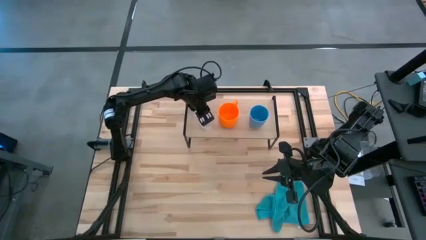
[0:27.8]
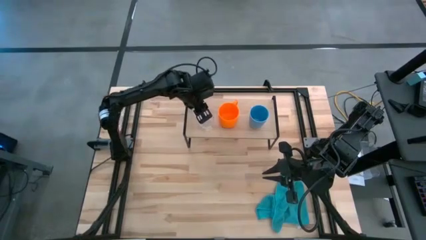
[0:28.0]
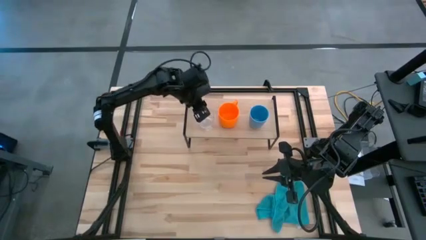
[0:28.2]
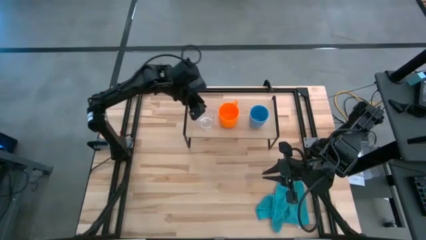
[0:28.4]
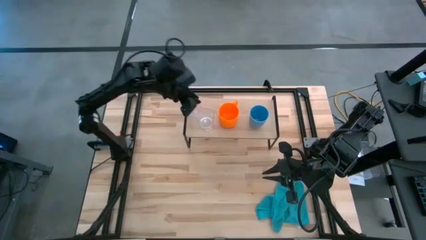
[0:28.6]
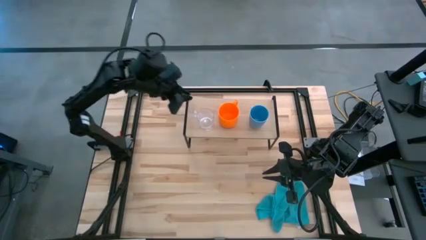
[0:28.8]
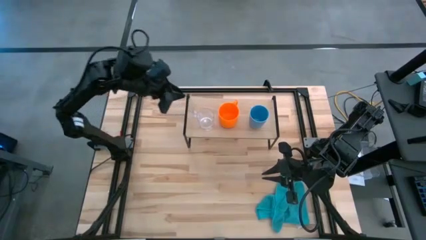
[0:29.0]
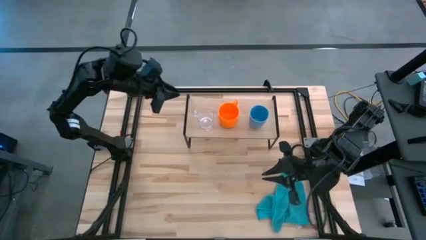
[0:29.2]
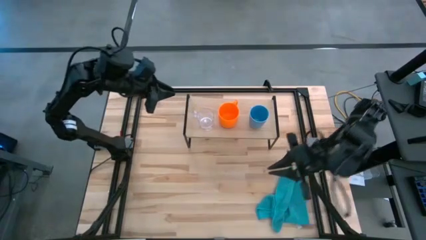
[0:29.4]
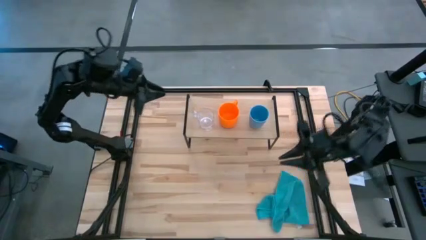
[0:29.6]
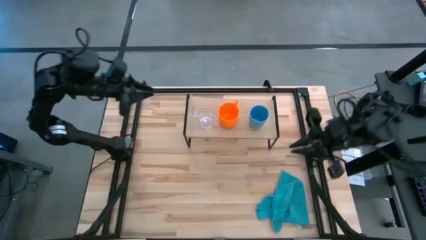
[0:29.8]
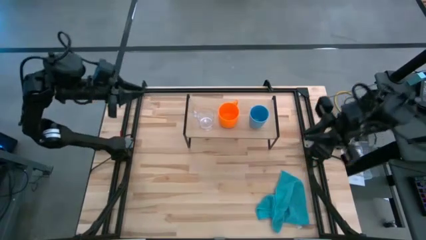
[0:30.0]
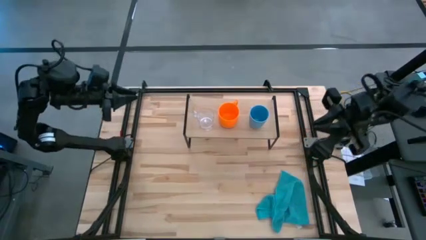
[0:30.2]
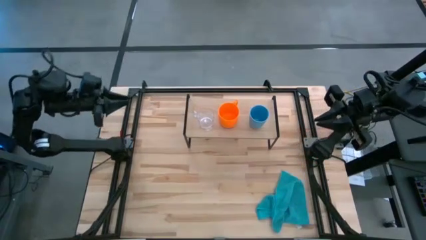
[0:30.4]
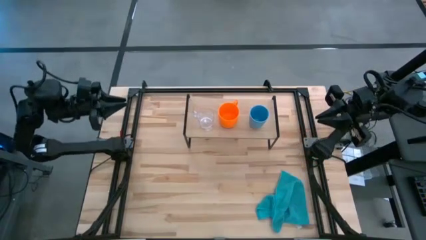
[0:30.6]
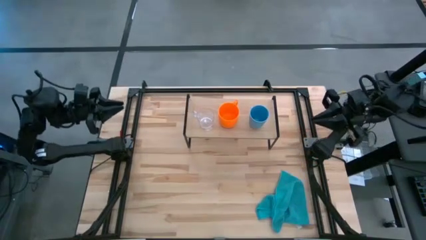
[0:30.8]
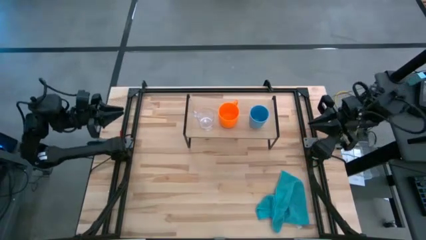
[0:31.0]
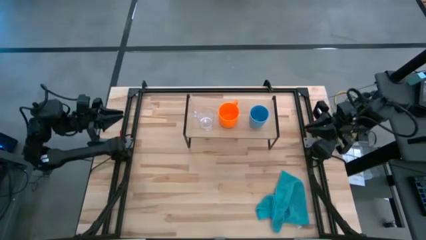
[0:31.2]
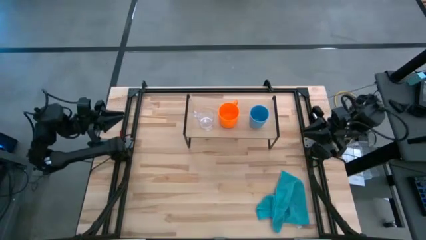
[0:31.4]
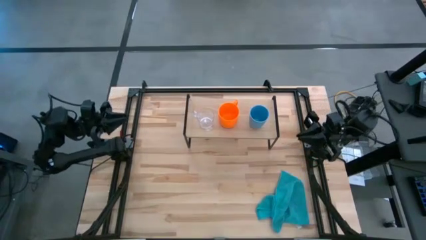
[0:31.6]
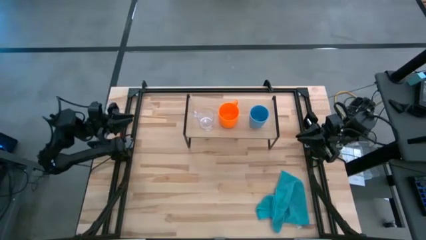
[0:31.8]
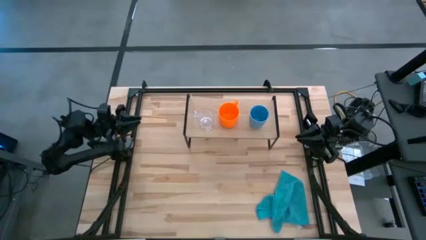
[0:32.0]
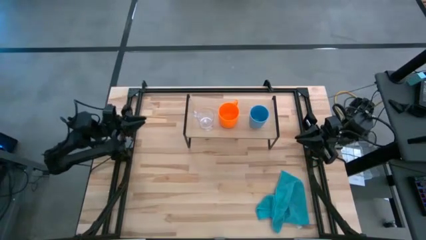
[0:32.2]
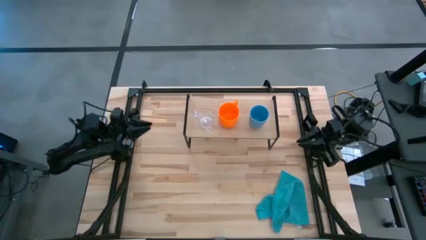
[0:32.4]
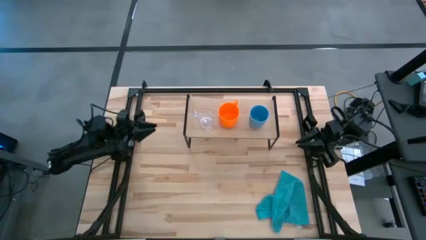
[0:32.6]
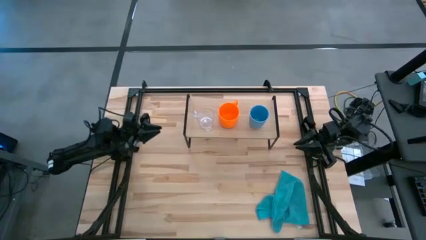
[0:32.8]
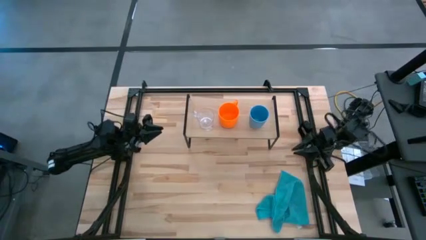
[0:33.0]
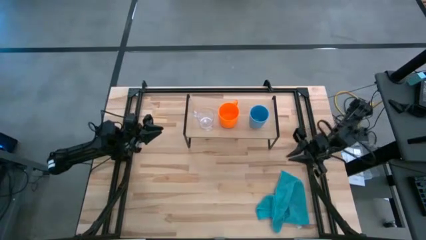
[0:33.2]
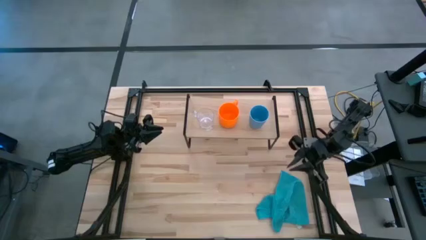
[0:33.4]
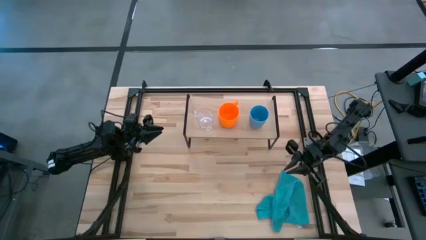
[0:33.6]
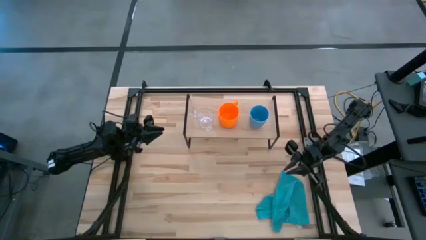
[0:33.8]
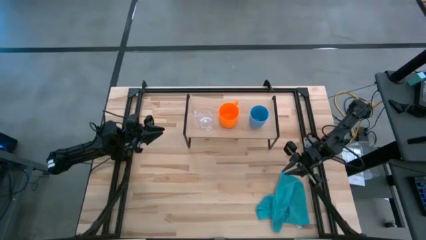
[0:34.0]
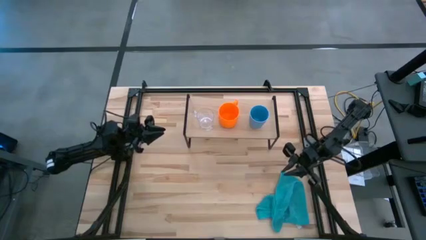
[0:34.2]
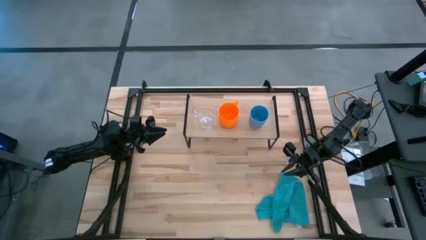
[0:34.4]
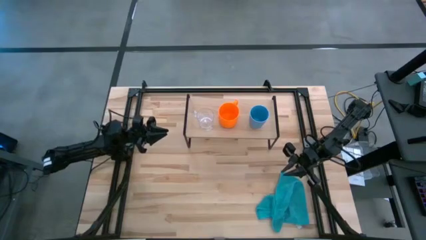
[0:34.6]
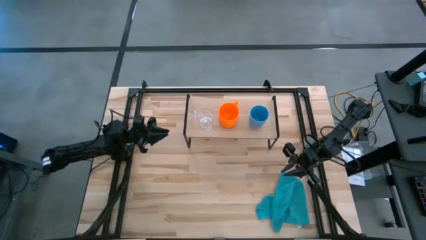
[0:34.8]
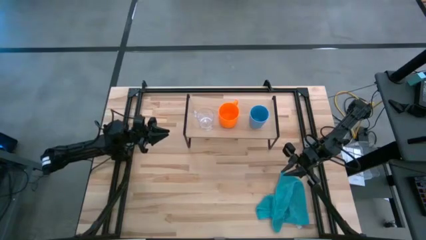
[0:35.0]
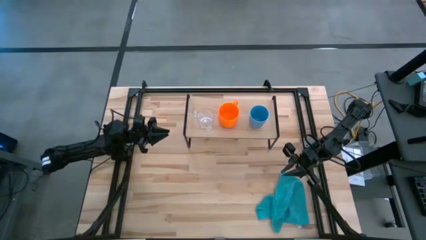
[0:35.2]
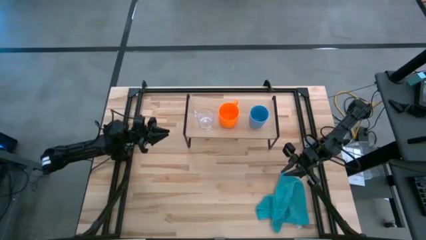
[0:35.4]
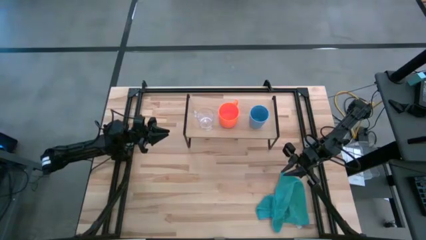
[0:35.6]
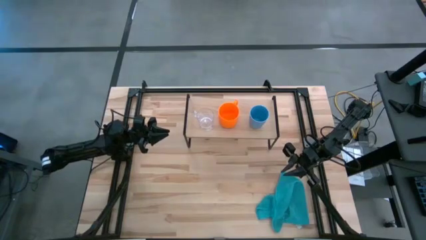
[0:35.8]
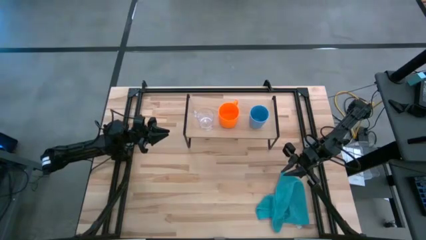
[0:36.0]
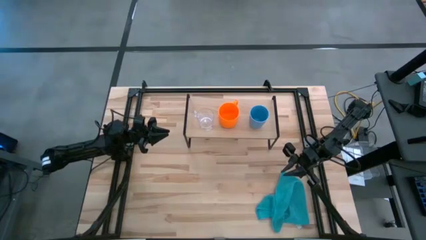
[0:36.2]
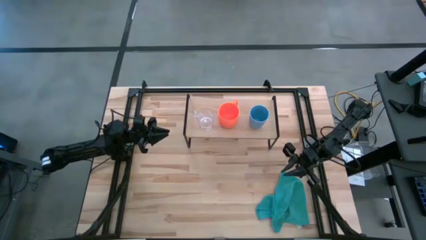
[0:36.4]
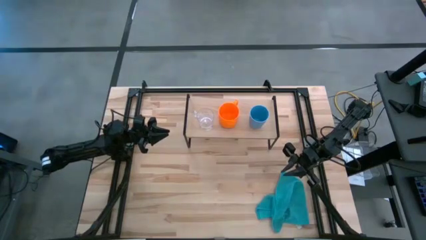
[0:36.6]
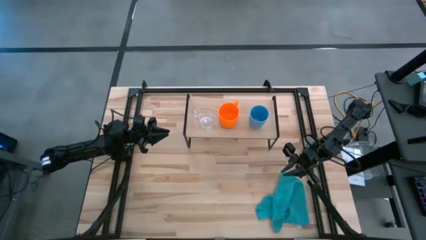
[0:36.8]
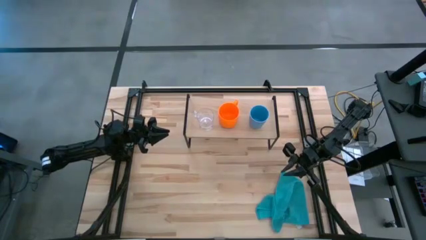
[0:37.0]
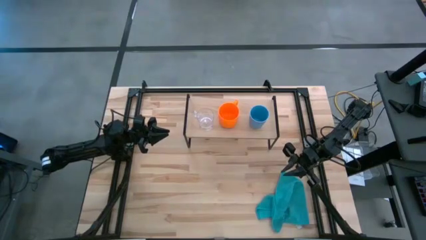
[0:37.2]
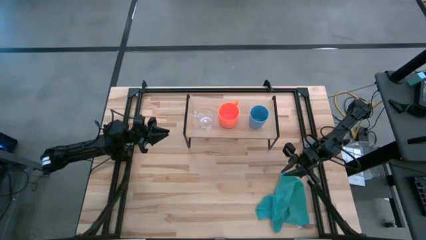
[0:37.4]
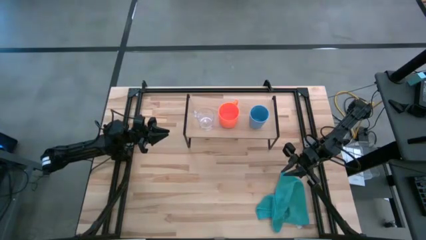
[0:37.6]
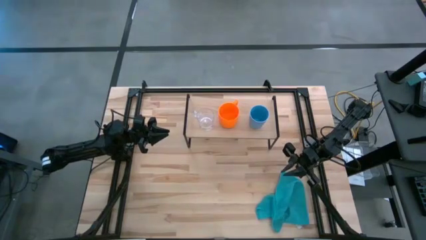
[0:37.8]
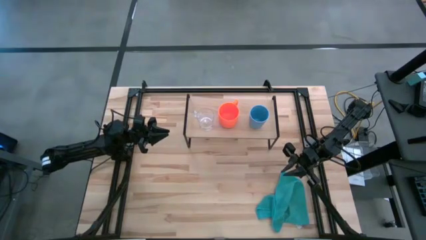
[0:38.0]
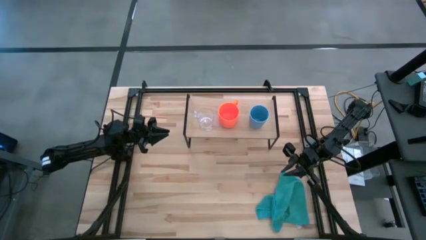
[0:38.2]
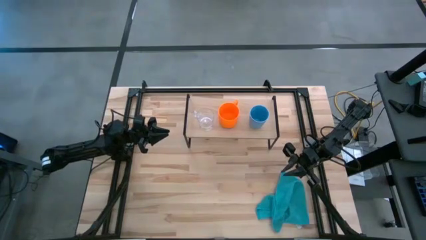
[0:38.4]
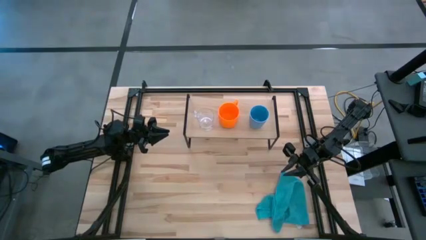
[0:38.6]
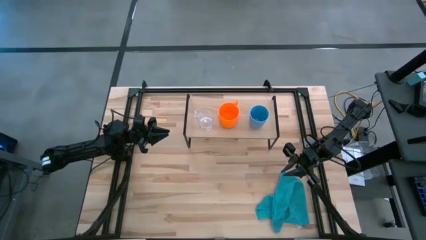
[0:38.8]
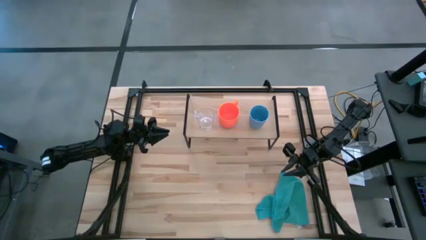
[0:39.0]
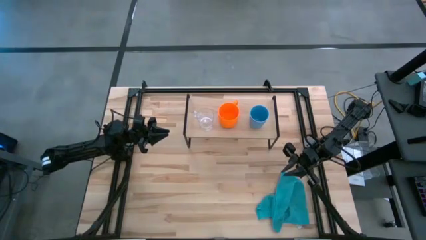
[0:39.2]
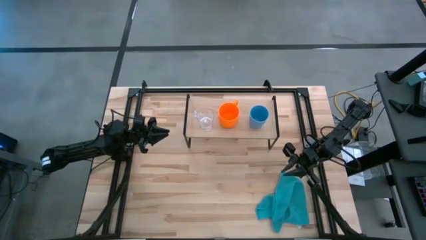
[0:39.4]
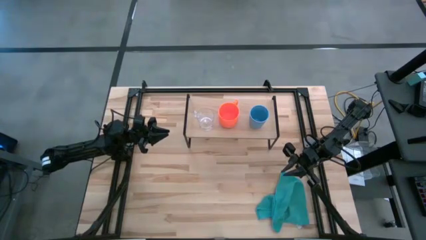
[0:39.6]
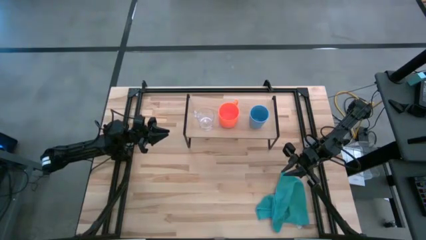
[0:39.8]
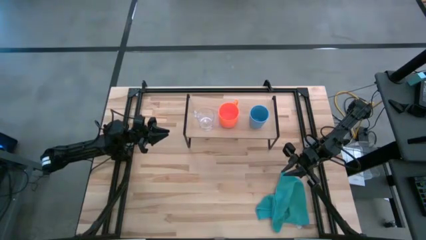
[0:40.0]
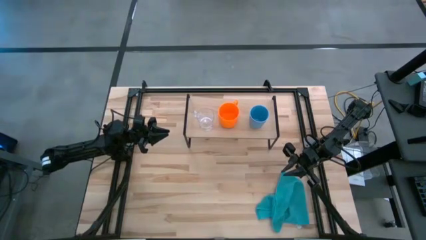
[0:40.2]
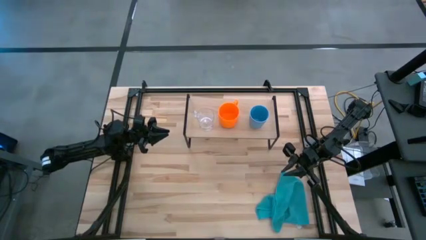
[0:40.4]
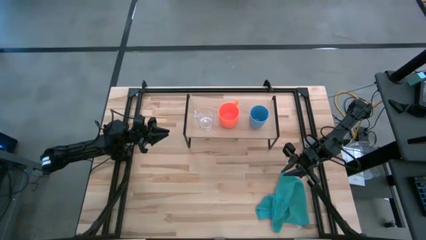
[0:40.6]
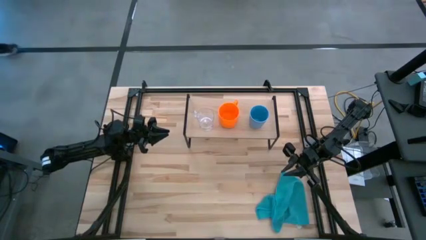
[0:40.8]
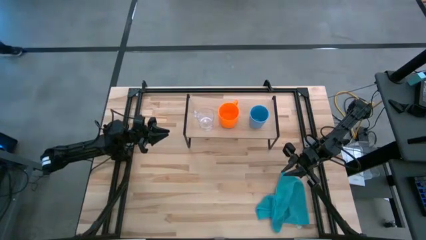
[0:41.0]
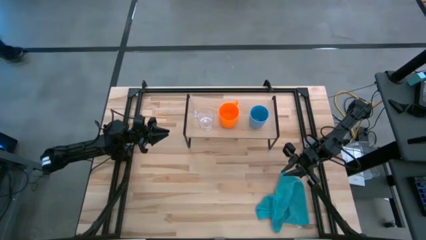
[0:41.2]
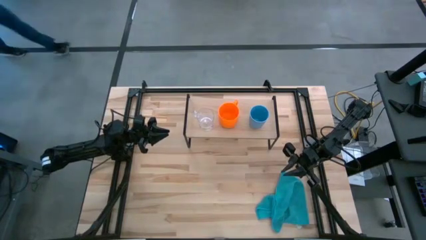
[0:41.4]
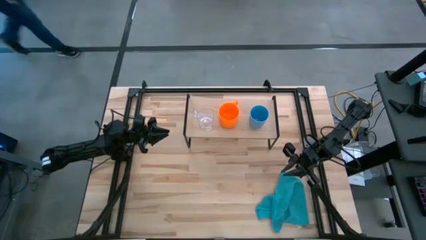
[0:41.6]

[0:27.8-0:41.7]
Task: Stack small to large cups/mugs on shelf
Return to Home Position
